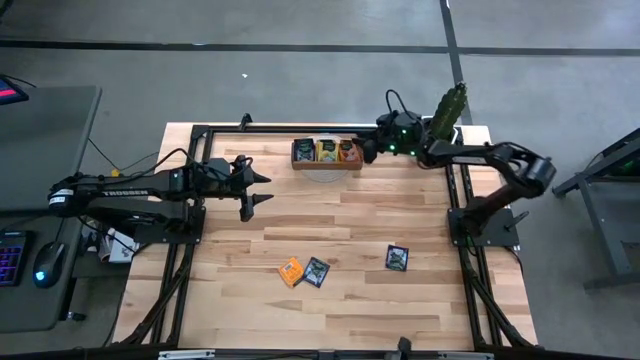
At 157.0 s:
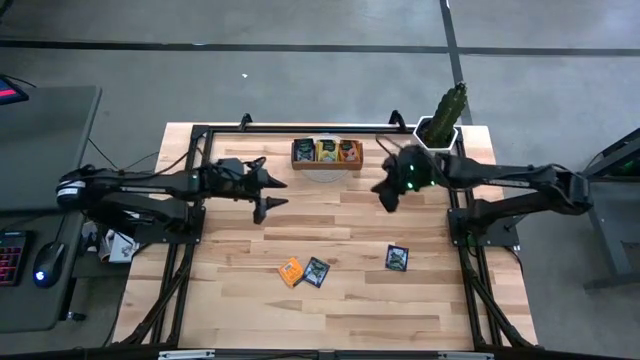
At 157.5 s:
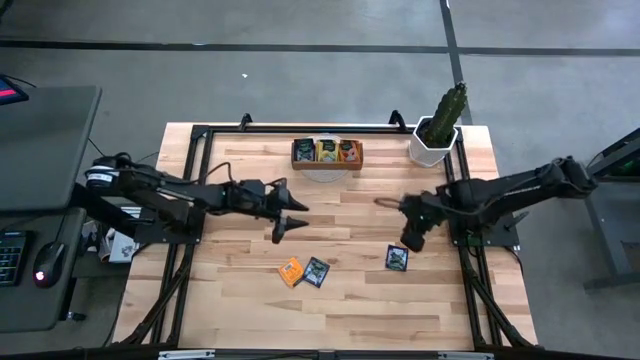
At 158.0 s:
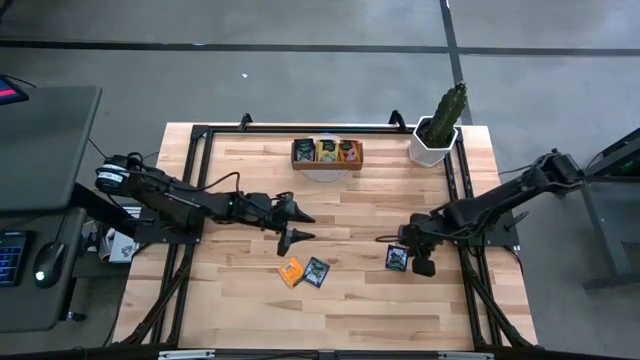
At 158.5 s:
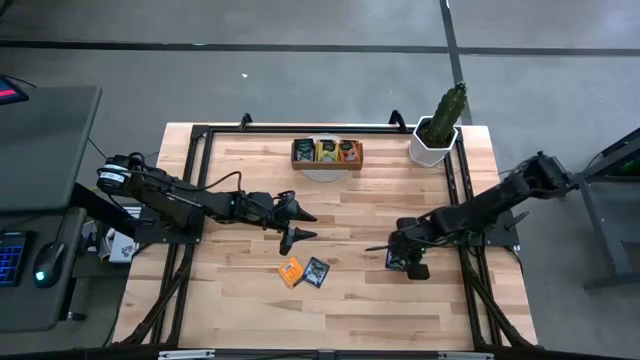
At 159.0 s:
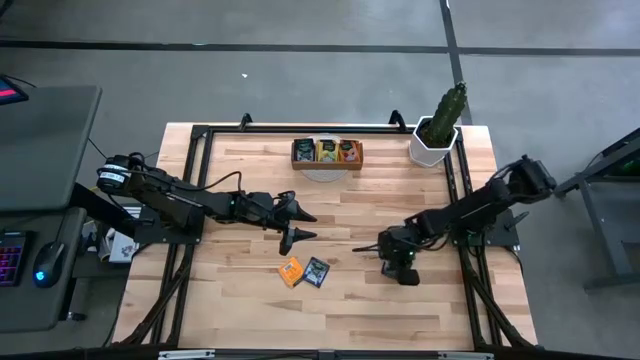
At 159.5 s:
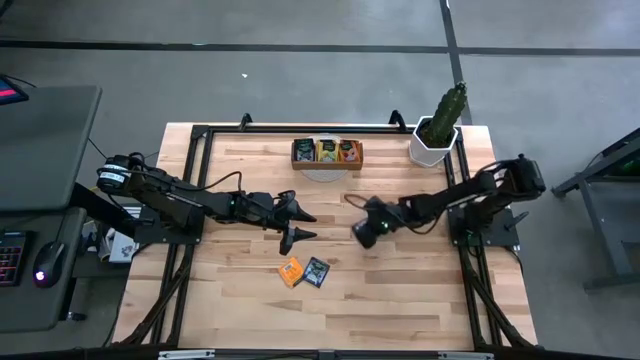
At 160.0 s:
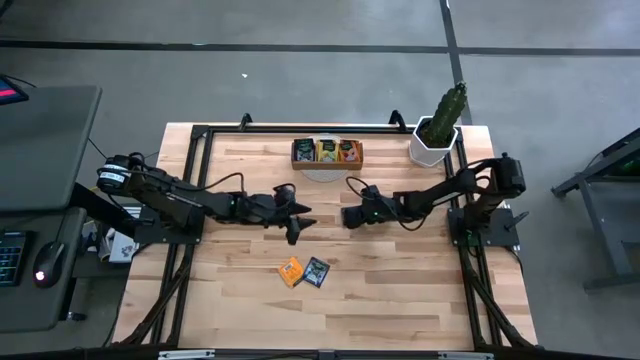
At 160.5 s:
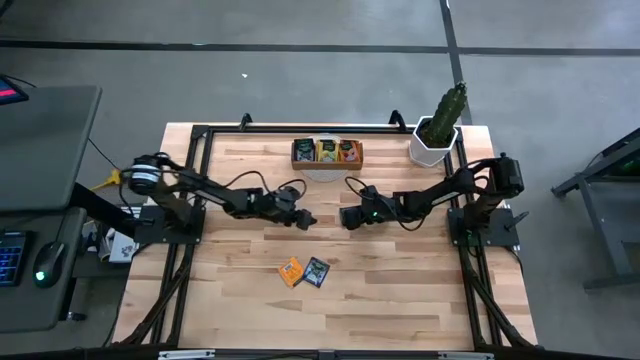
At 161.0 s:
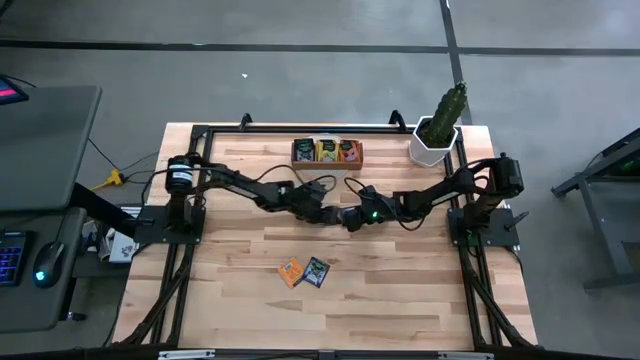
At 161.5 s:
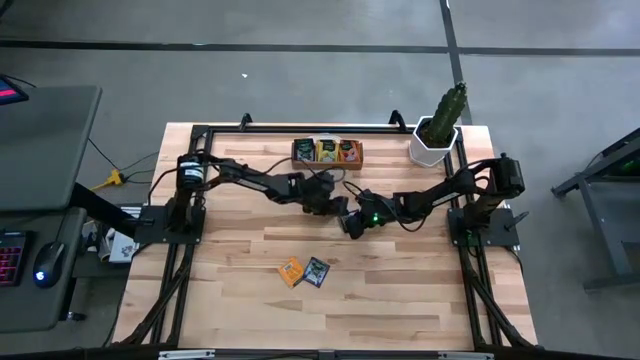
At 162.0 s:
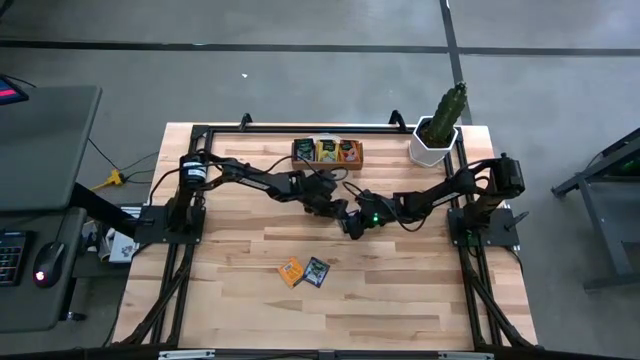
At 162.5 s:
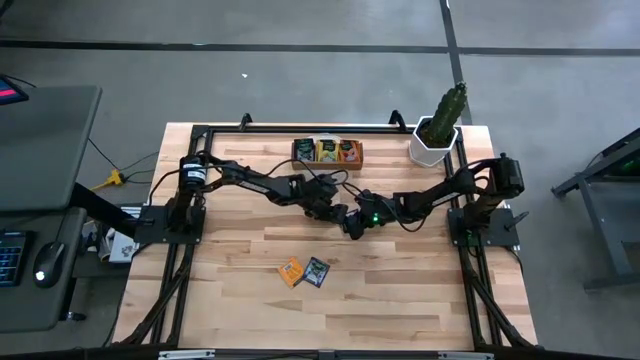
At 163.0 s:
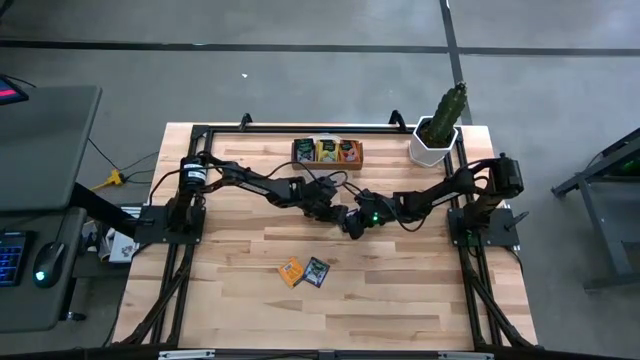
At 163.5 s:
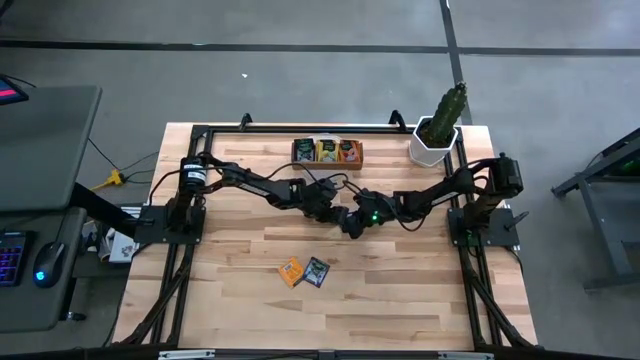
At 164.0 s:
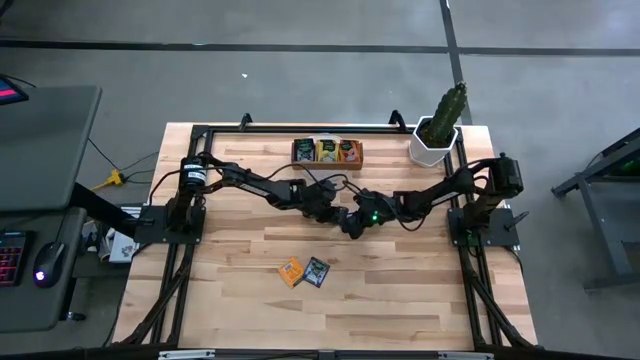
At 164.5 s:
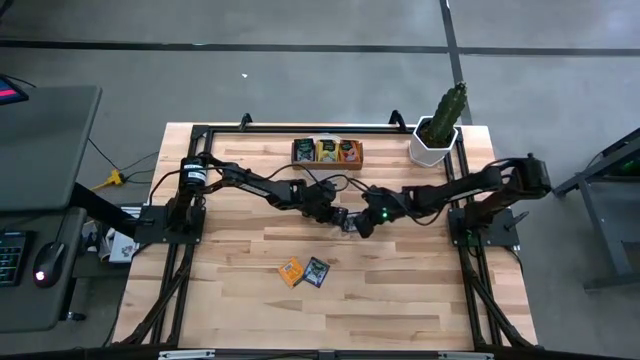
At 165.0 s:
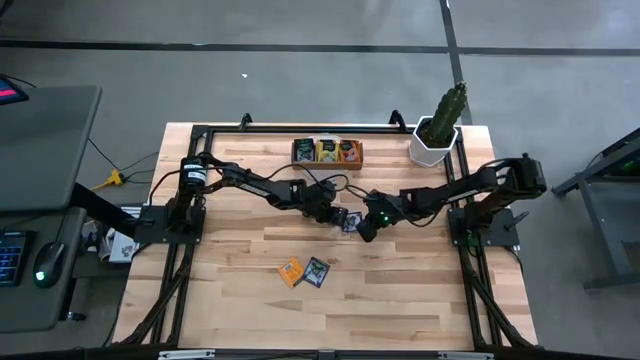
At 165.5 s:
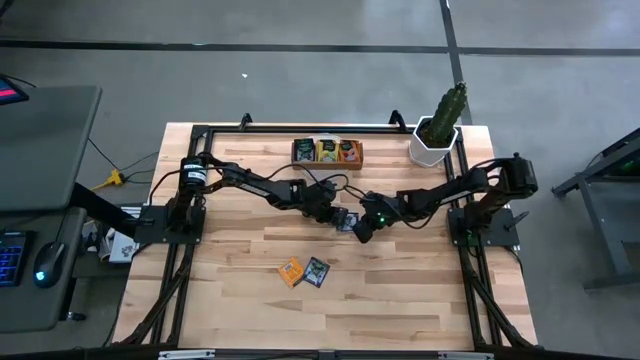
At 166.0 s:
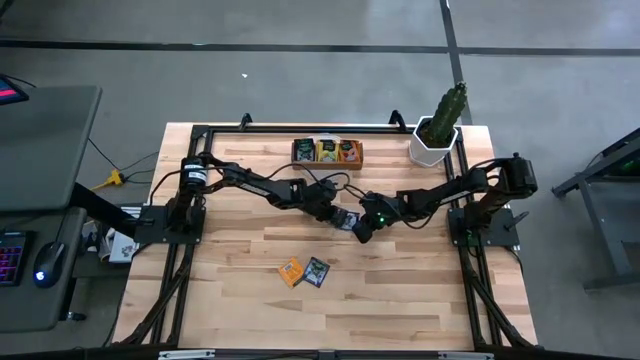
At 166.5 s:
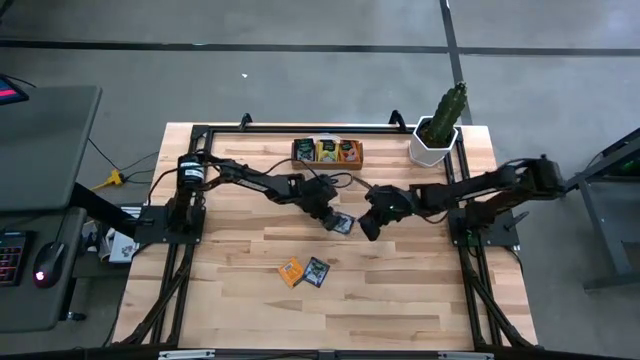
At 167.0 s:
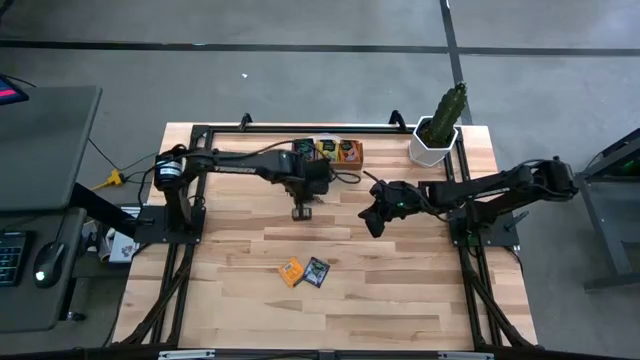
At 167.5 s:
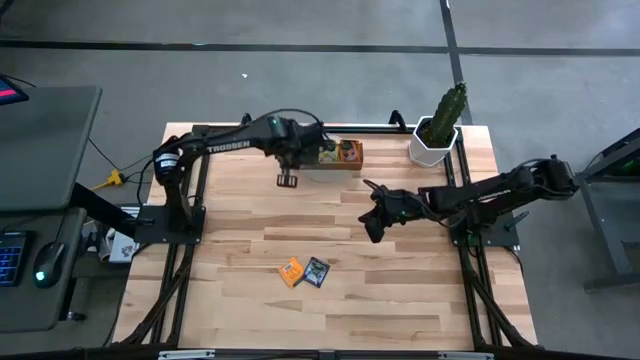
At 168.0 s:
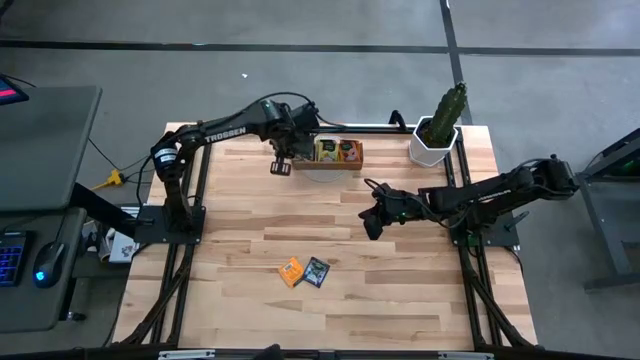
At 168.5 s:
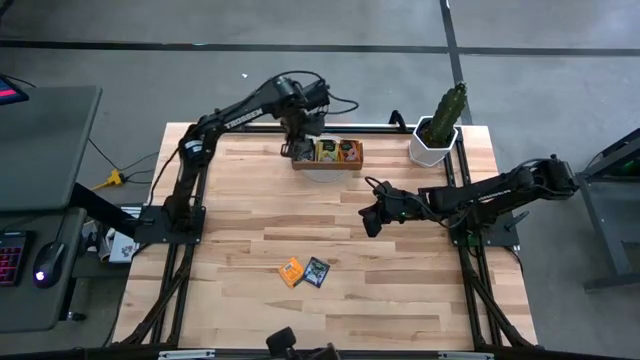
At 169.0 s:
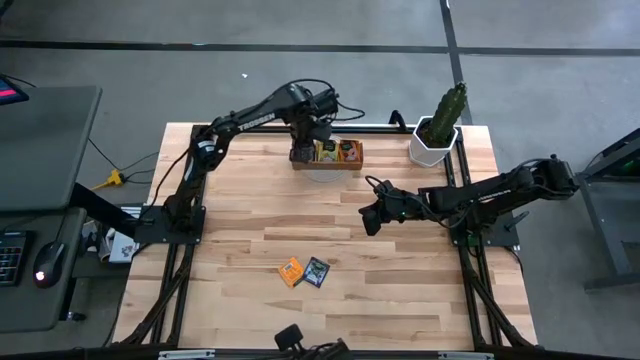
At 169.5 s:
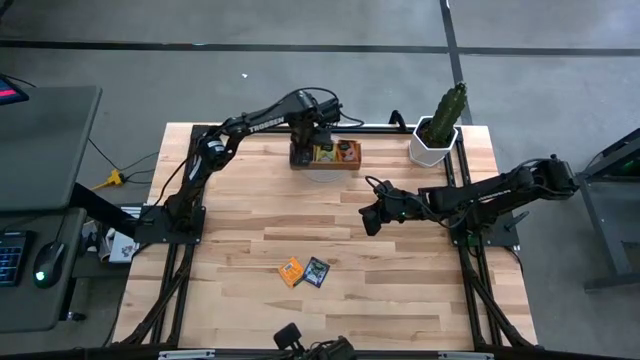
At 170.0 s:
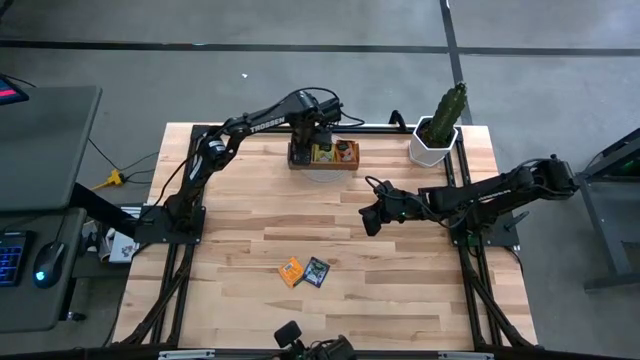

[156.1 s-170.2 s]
Task: Pick & Place Tea
Put the right purple tea bag in the left compartment of the organizer
